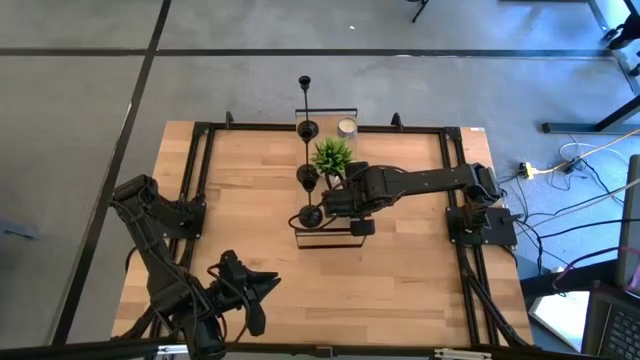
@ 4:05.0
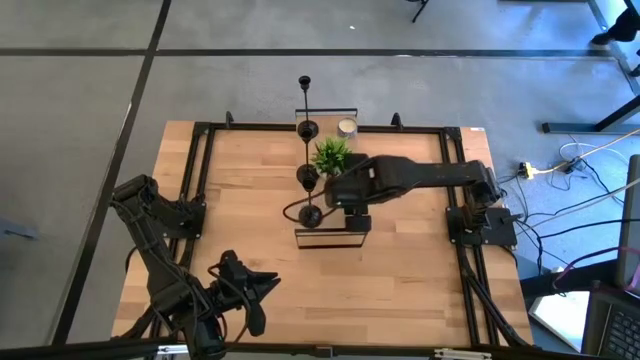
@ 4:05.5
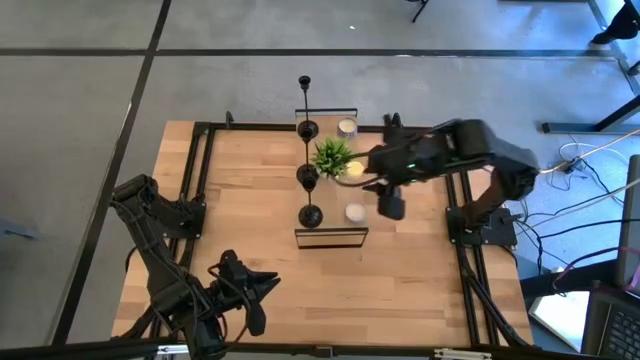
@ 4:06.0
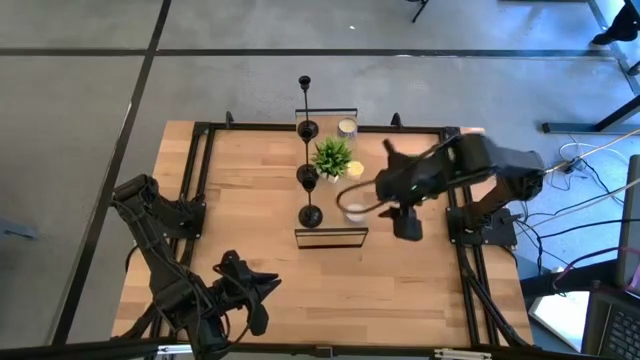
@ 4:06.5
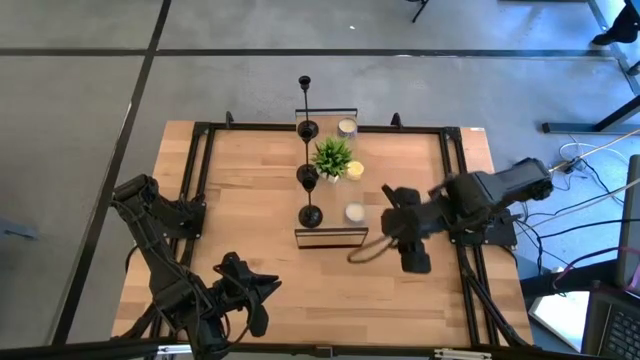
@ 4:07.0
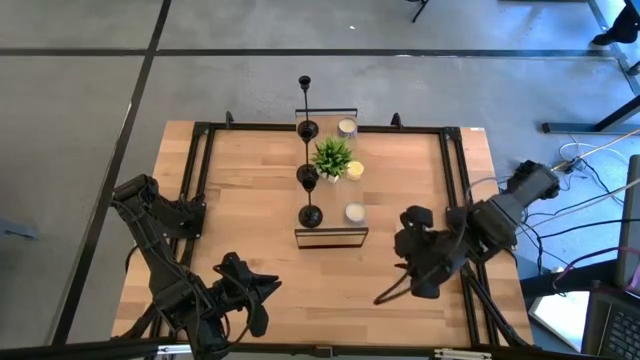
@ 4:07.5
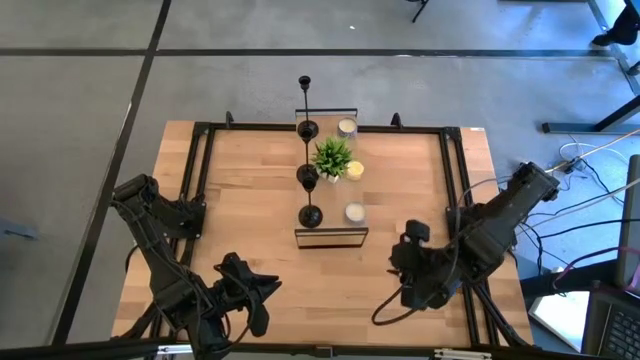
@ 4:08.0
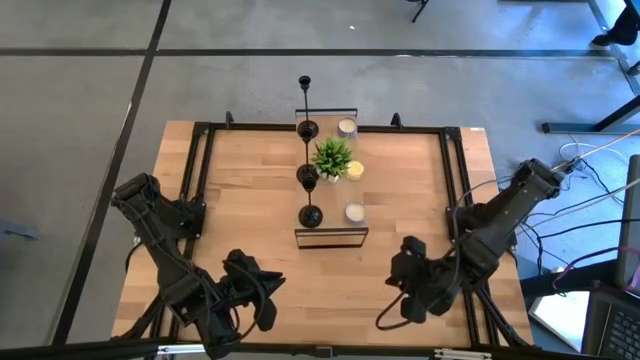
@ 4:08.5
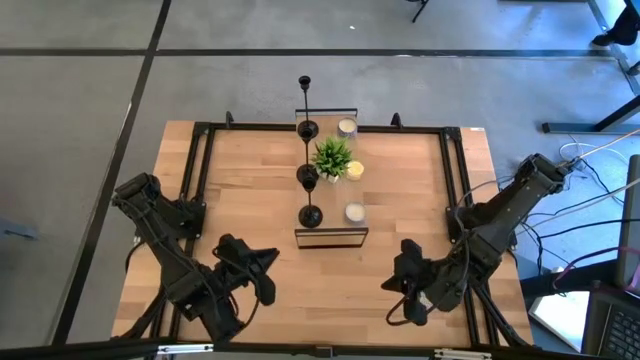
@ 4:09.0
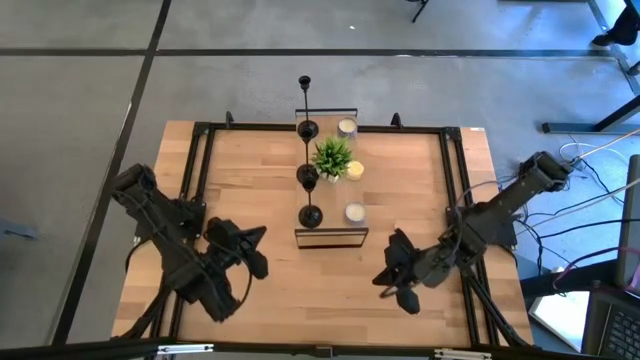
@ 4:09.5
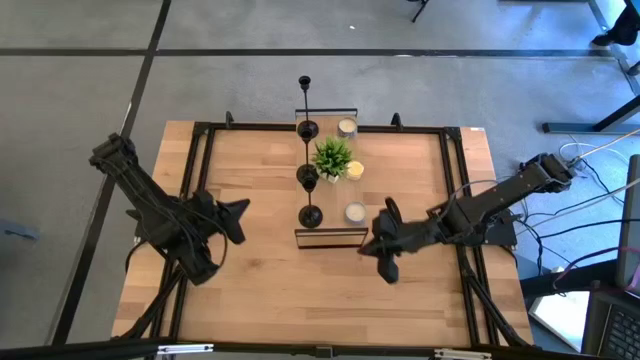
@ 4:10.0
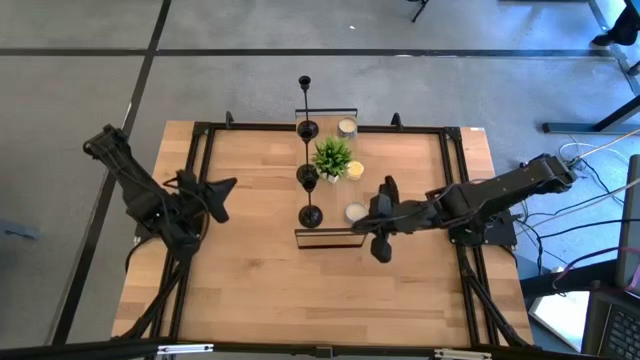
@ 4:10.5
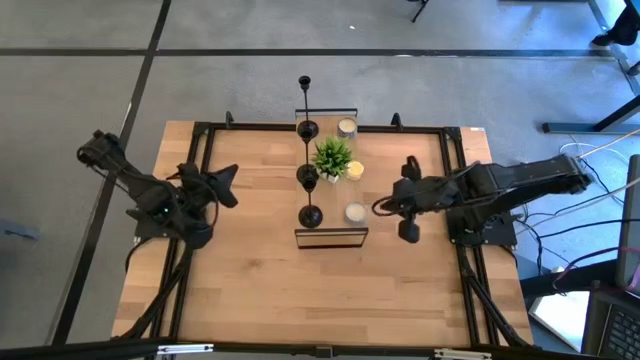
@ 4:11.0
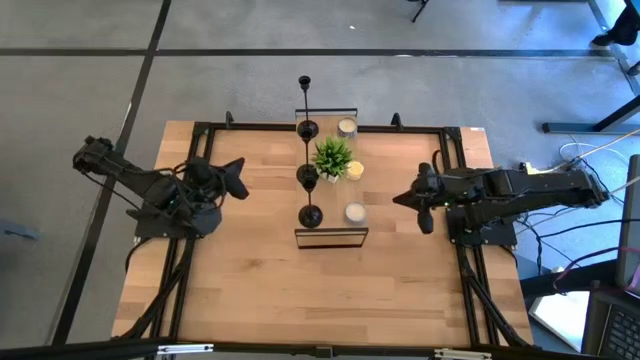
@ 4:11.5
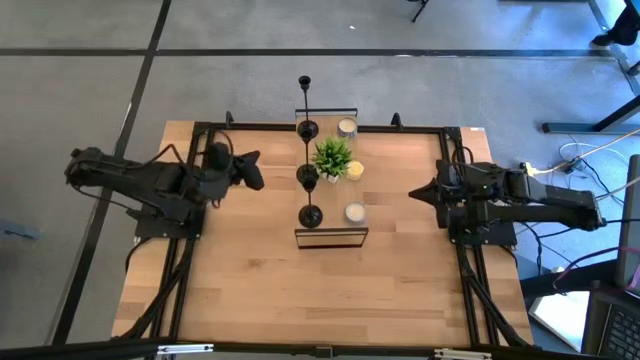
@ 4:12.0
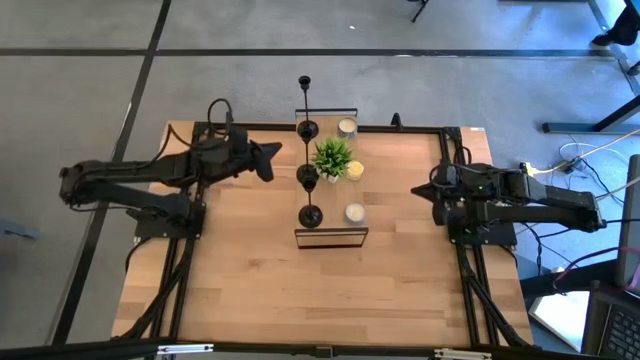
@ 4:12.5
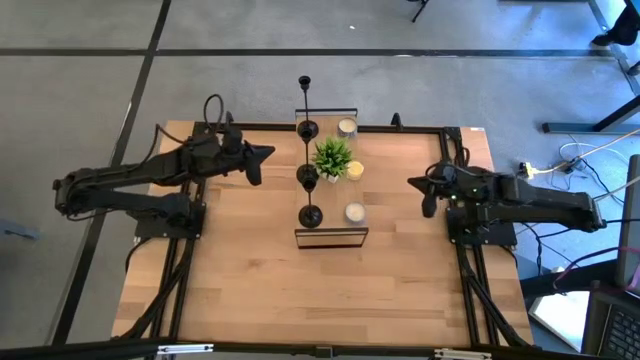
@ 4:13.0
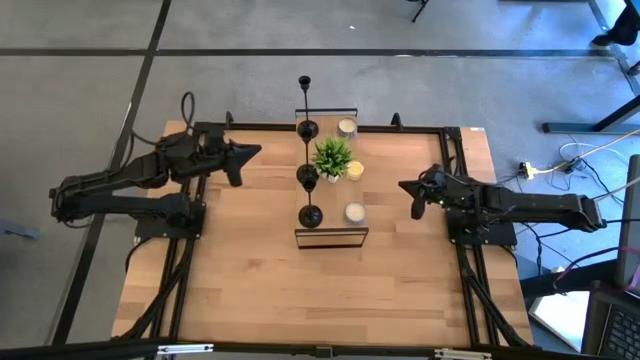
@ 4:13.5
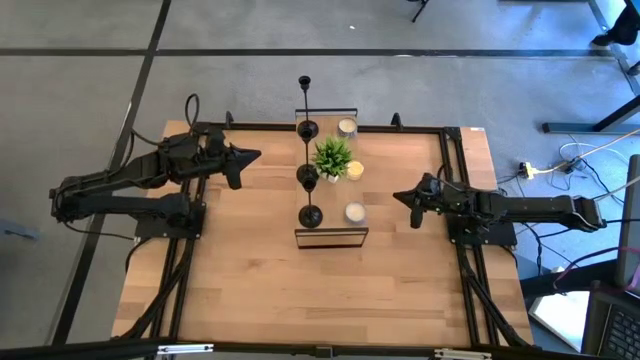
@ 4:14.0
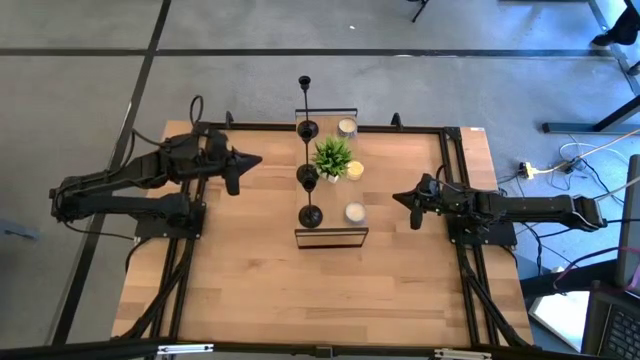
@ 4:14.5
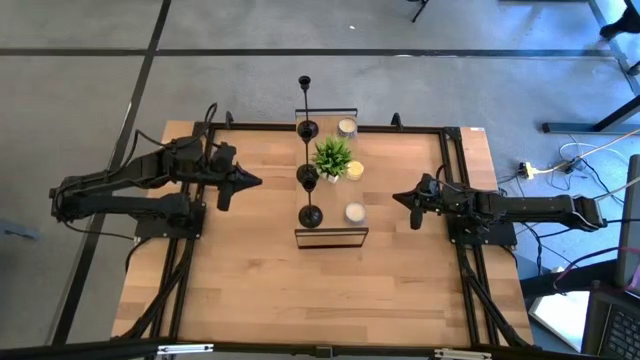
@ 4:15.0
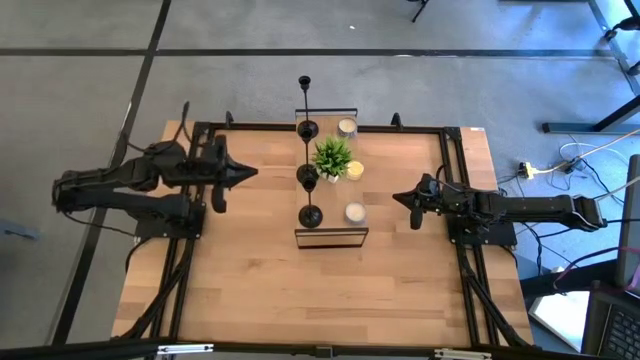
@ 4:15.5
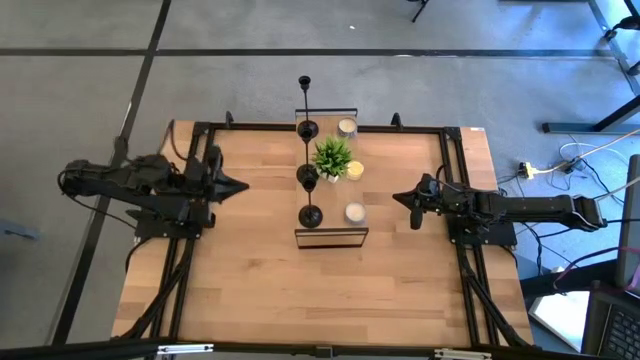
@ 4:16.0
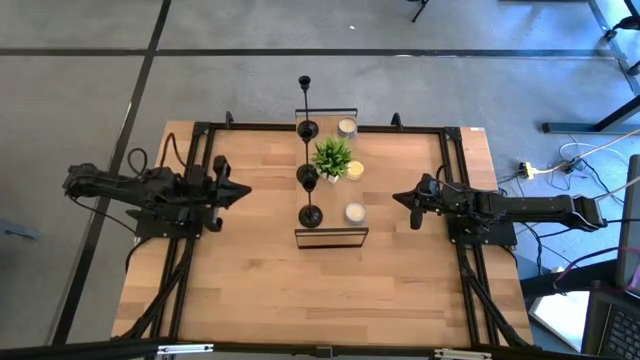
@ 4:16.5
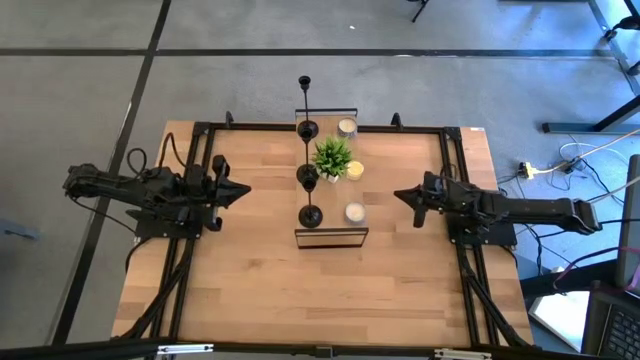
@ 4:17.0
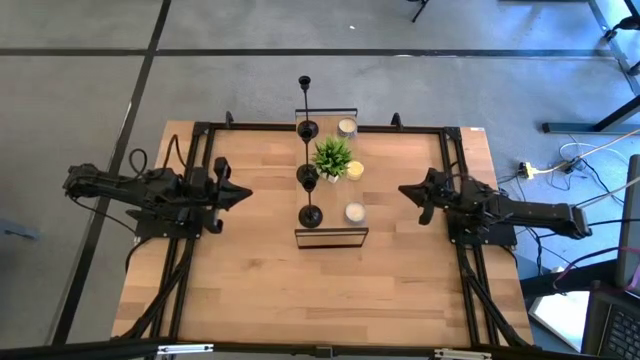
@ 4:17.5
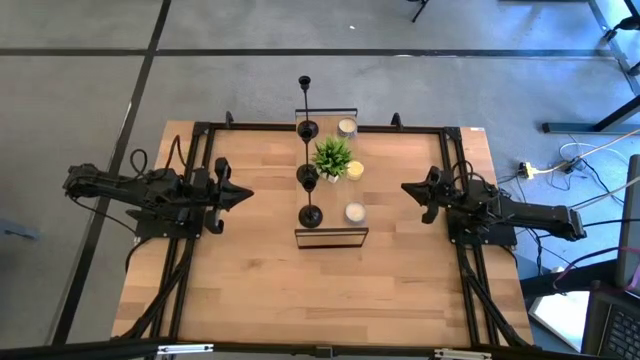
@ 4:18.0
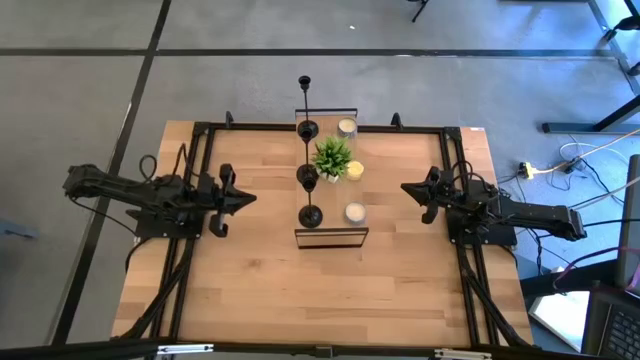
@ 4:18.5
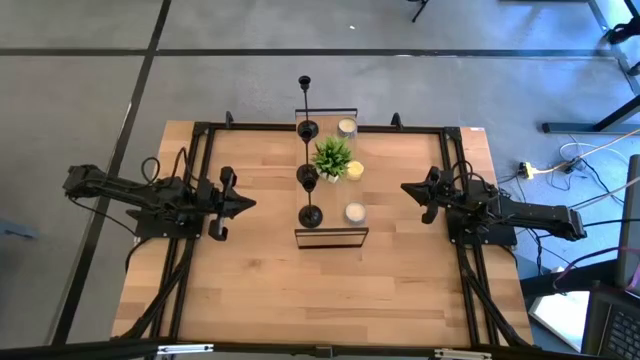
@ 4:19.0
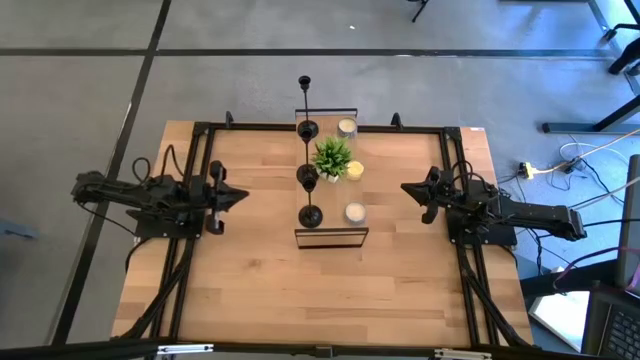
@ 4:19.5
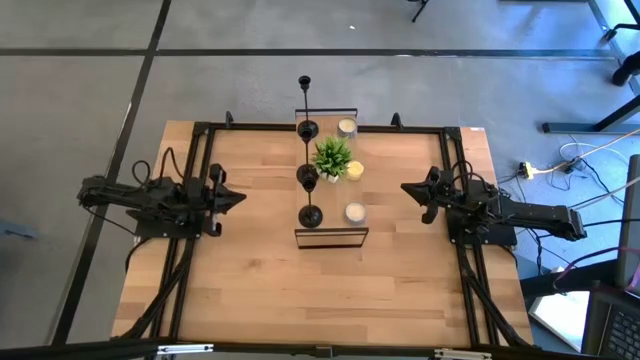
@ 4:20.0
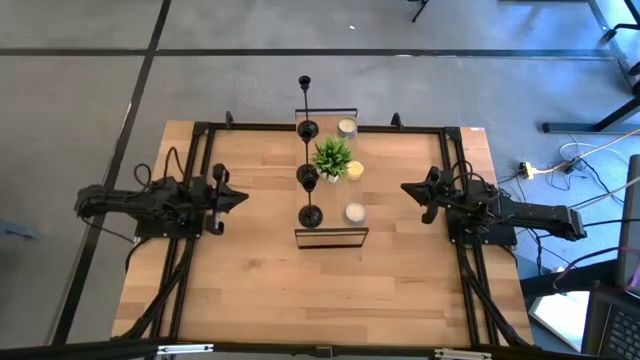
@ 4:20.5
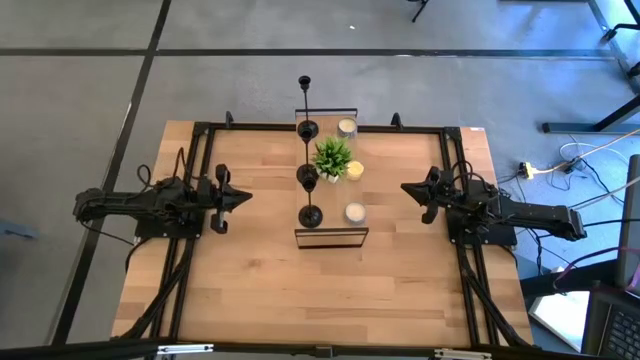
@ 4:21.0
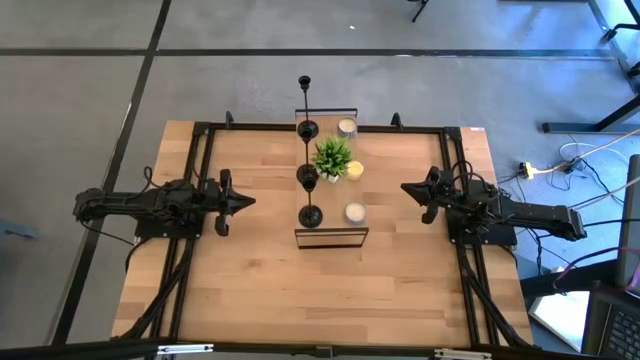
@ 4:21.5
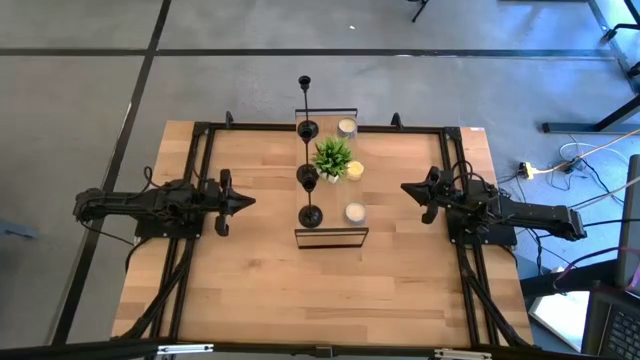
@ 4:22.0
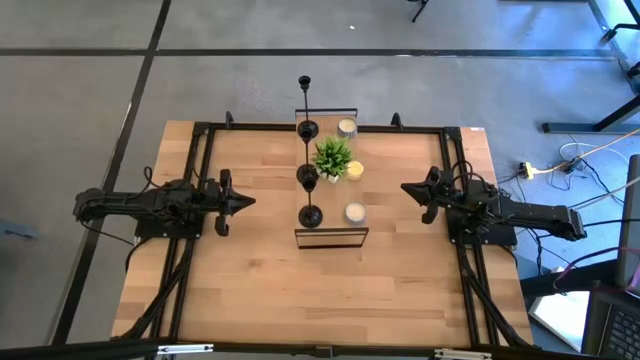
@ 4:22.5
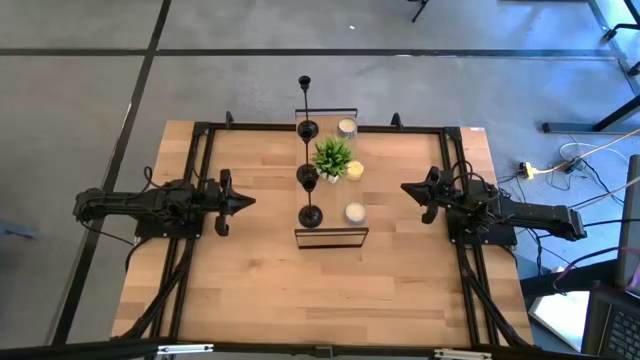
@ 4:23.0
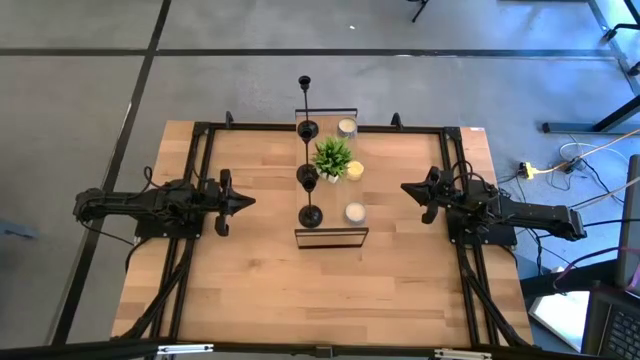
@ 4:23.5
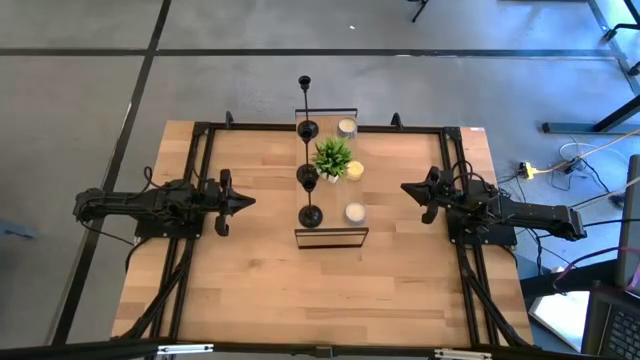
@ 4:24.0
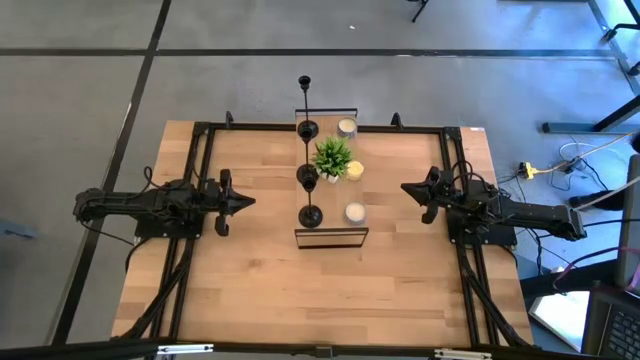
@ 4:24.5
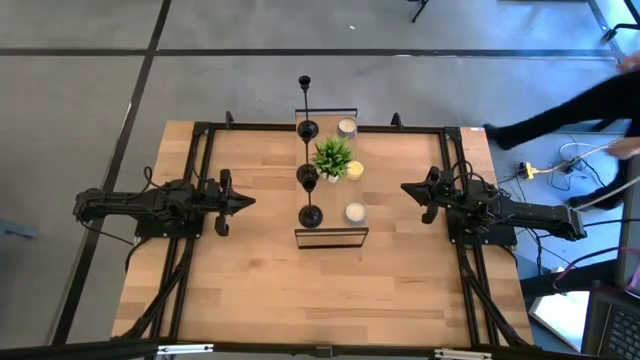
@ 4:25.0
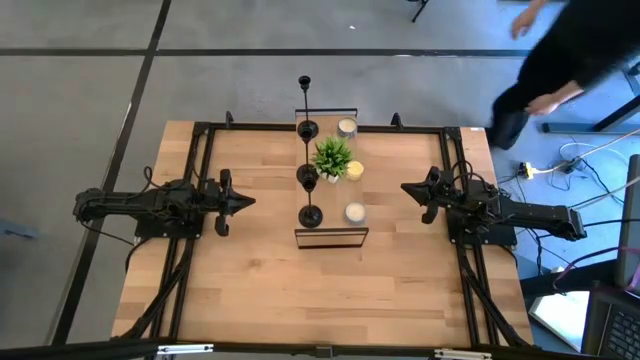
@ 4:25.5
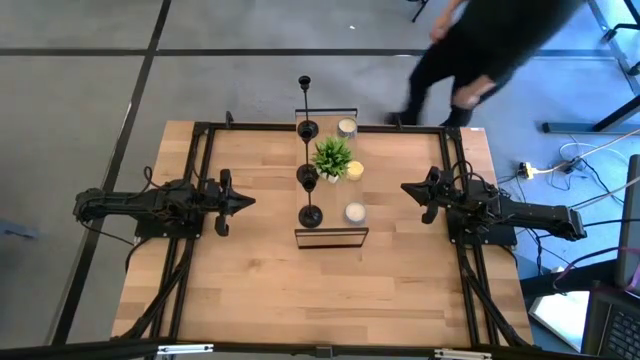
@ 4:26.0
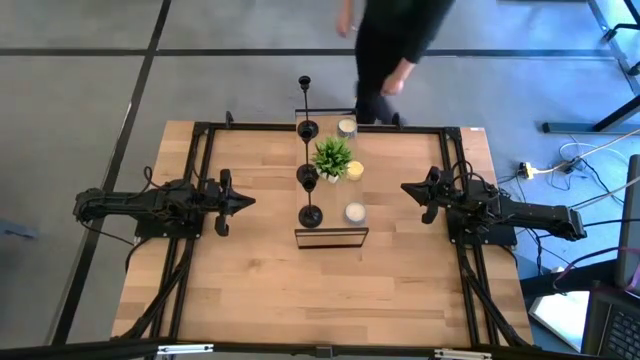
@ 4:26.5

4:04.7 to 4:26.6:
Task: Pick & Place candle stick holders
Return to Home Position
